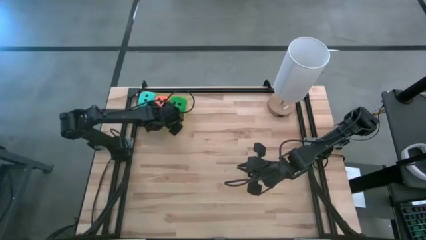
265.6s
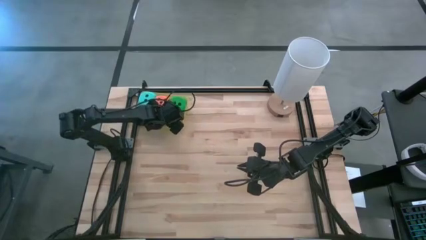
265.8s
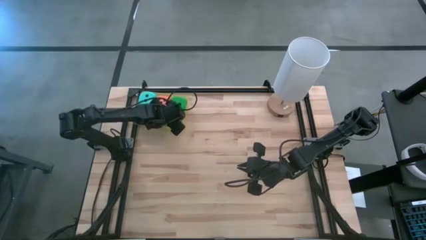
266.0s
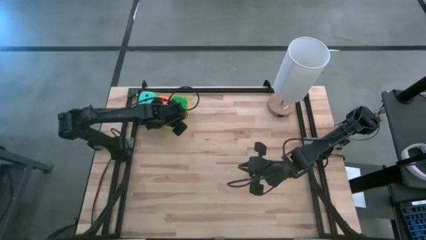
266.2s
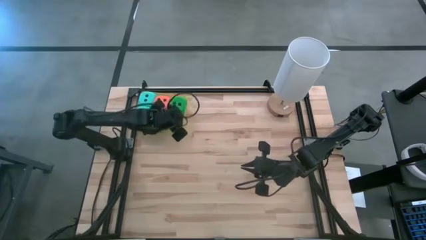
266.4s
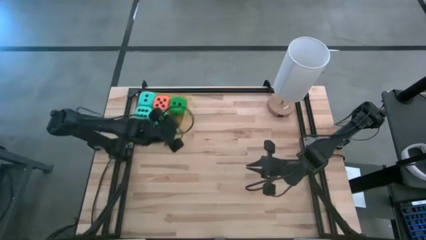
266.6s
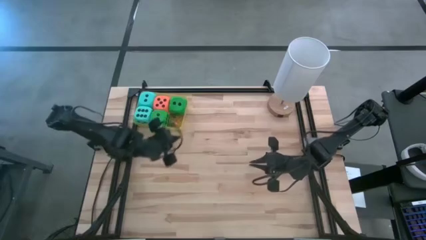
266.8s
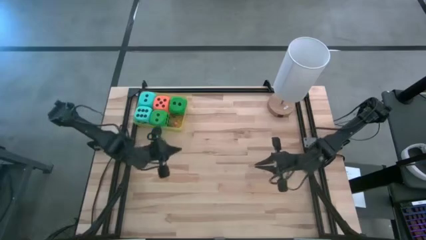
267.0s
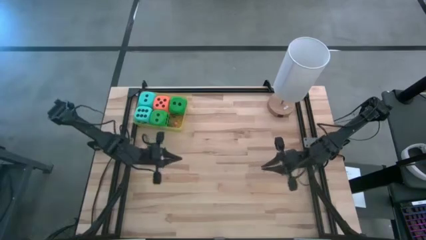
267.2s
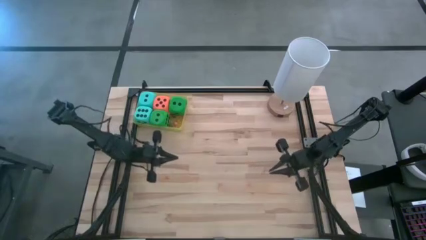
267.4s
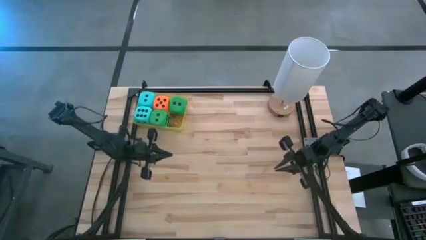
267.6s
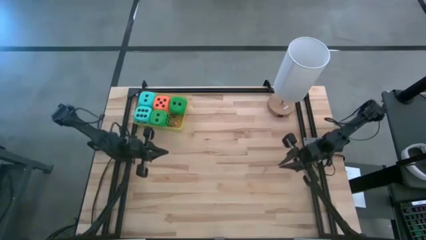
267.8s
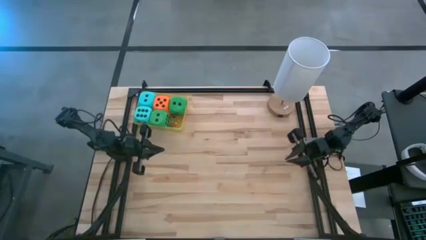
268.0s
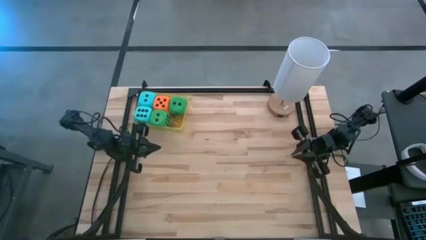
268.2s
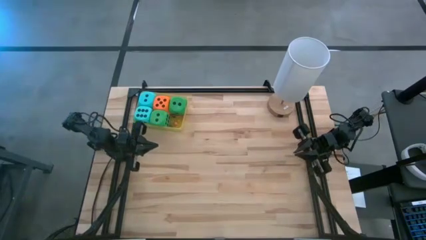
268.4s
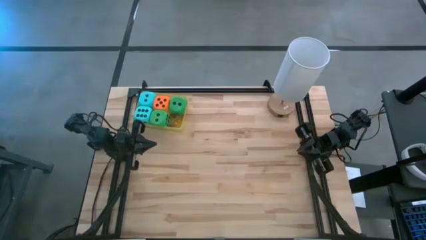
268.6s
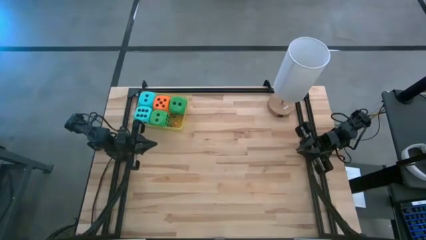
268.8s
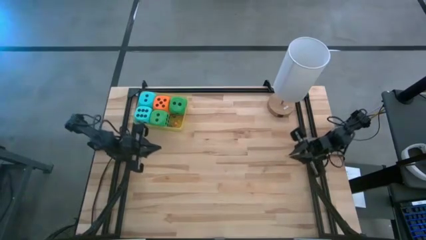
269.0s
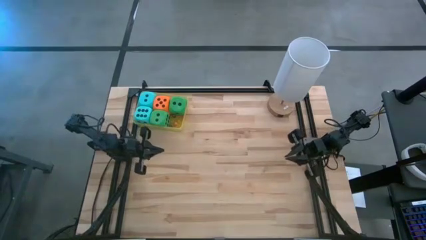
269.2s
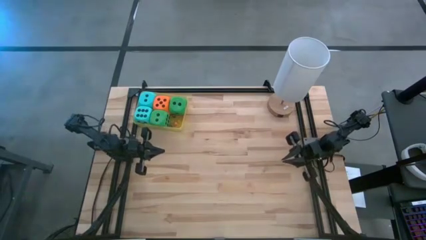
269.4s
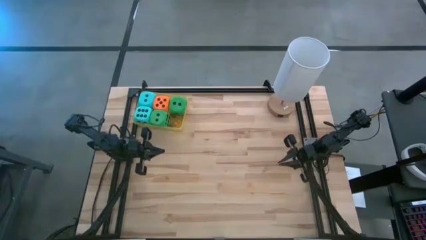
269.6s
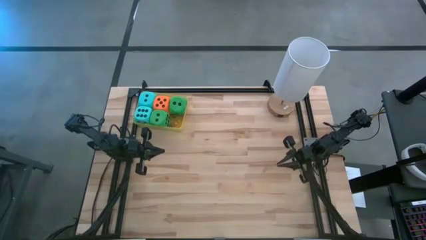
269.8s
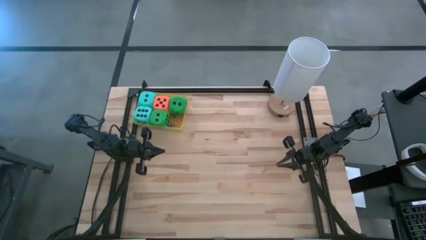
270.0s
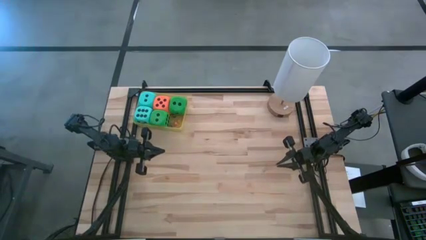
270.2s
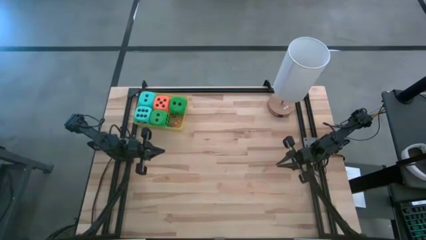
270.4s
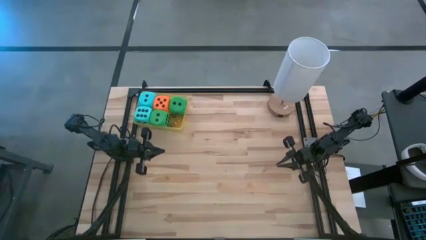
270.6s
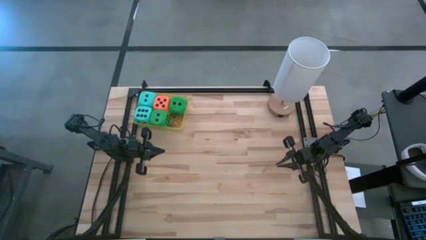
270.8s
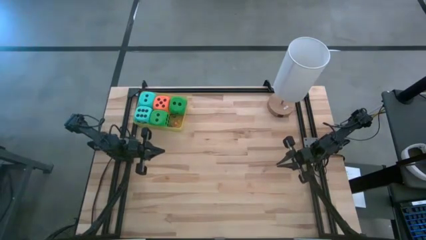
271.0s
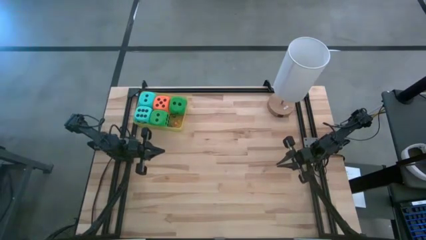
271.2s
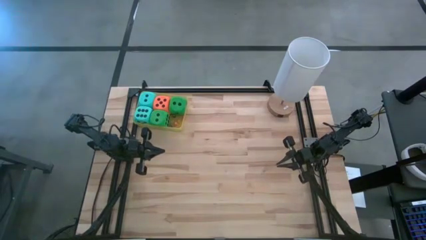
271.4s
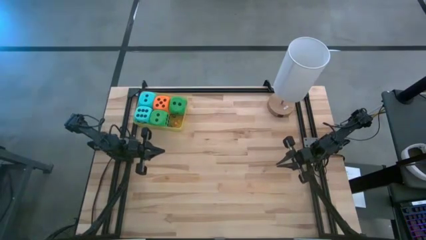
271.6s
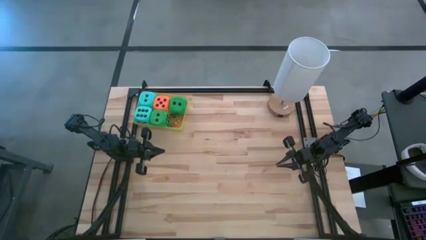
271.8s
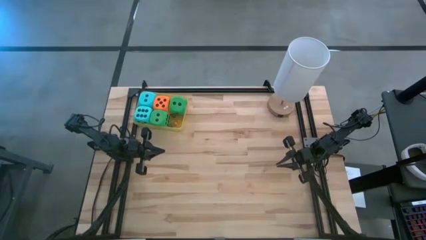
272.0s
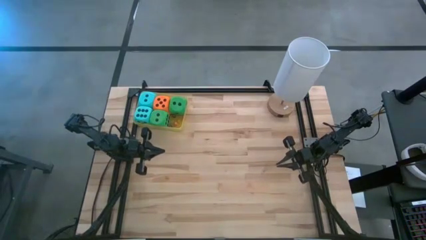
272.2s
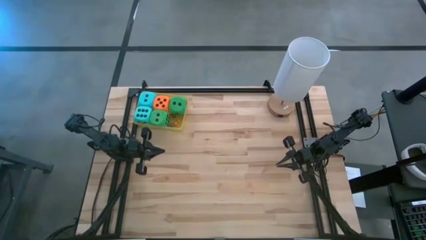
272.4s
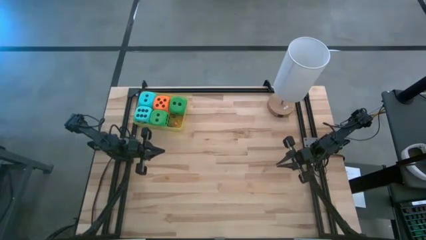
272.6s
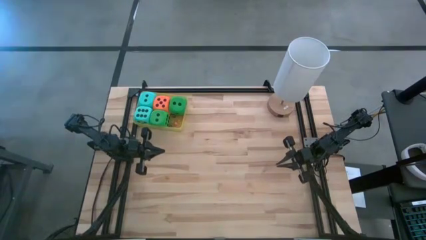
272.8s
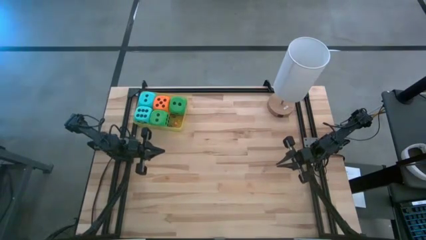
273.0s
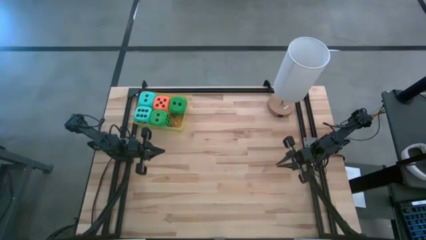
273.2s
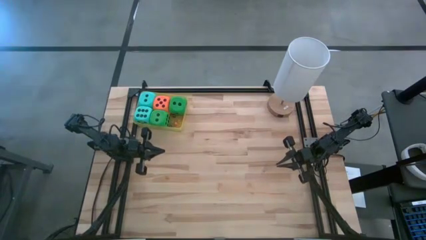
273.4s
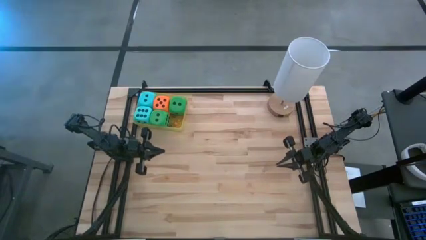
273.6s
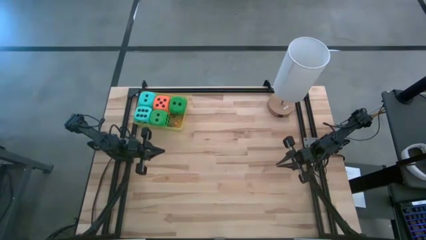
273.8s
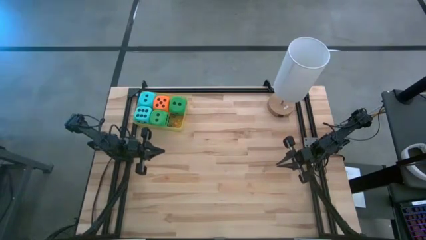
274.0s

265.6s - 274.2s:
Task: Pick & Place Dice
Return to home position

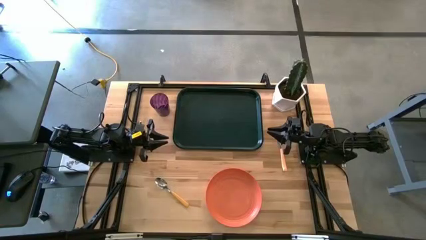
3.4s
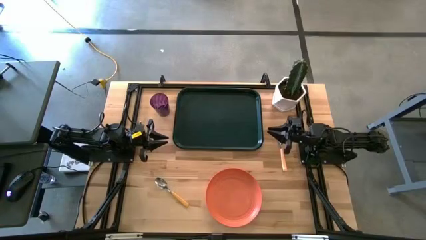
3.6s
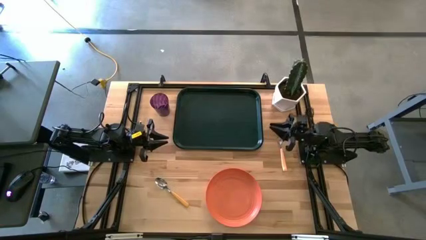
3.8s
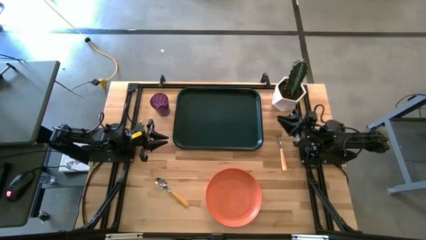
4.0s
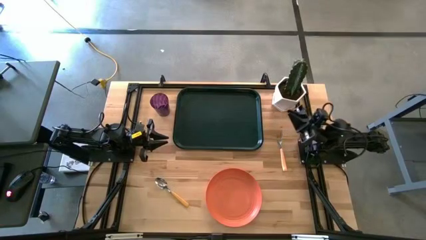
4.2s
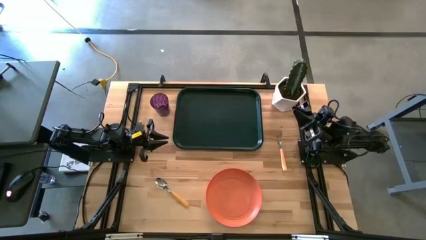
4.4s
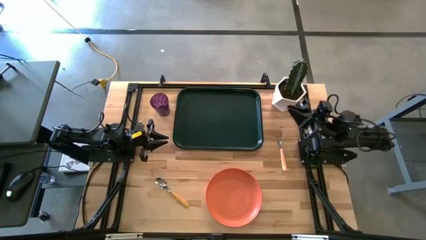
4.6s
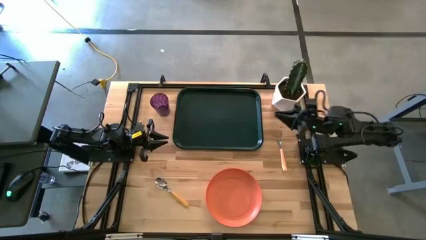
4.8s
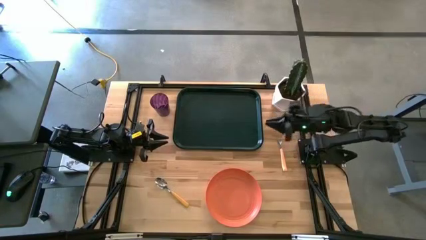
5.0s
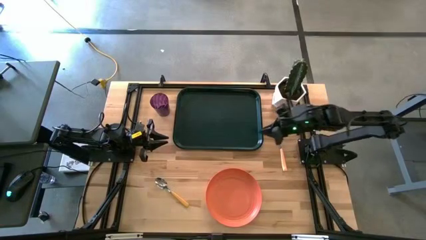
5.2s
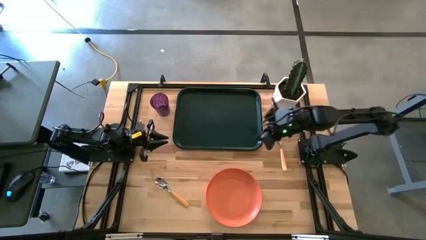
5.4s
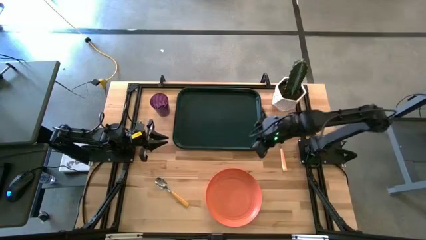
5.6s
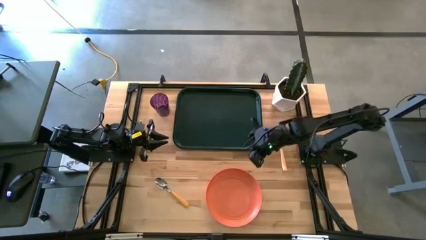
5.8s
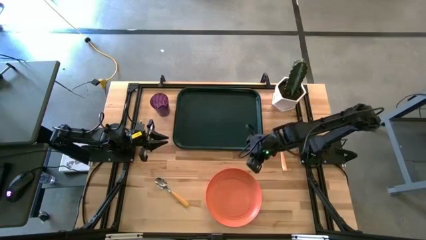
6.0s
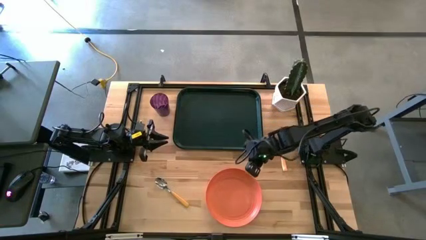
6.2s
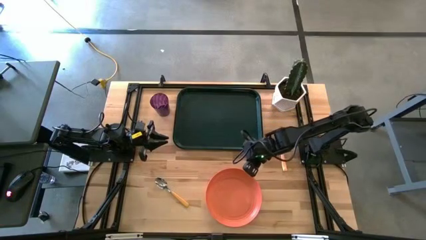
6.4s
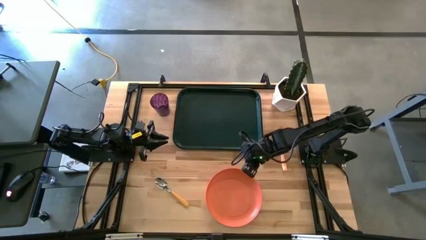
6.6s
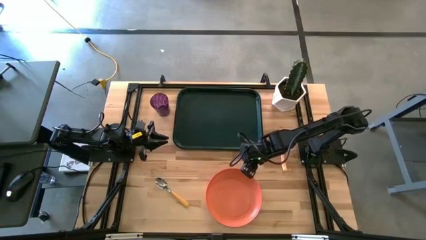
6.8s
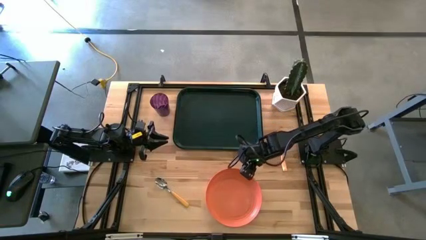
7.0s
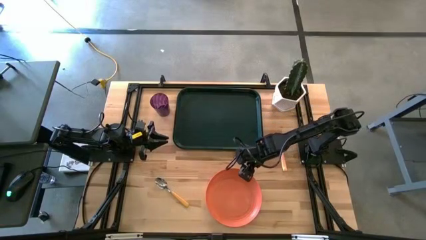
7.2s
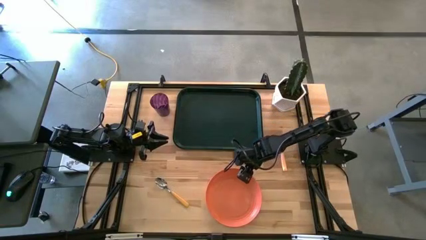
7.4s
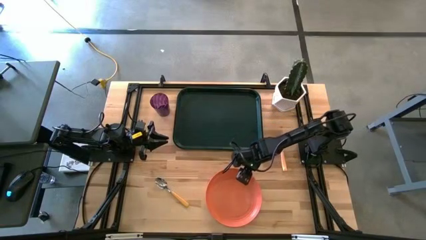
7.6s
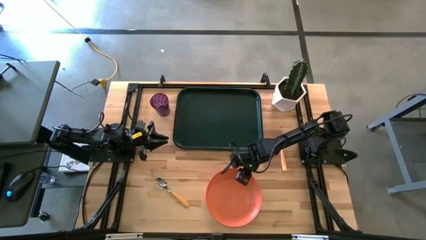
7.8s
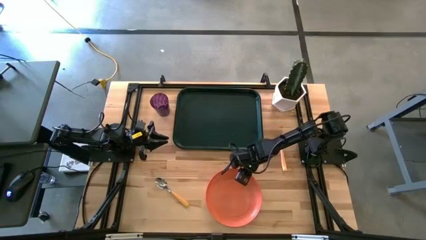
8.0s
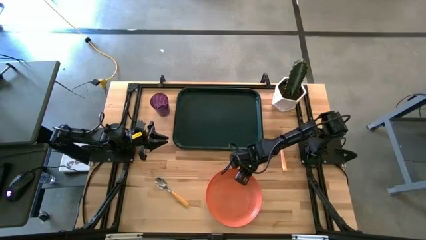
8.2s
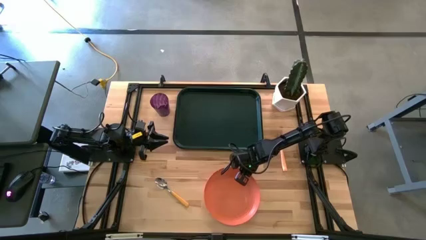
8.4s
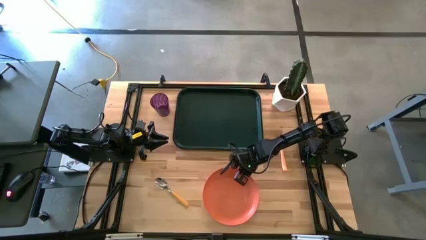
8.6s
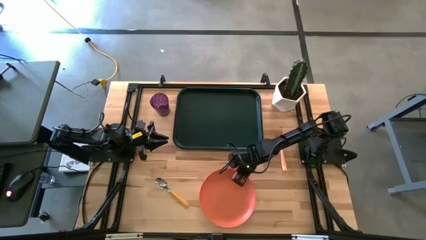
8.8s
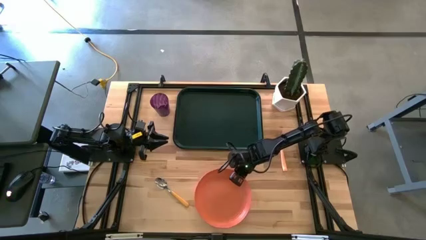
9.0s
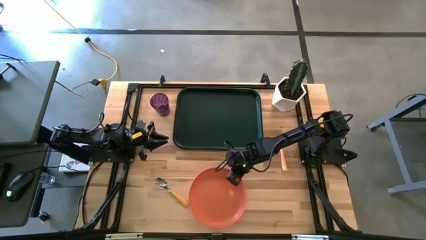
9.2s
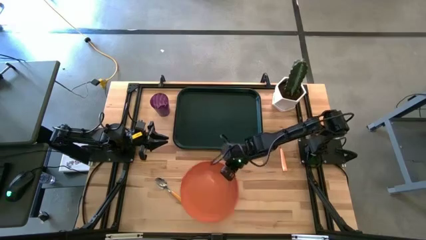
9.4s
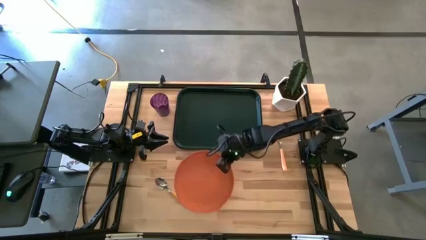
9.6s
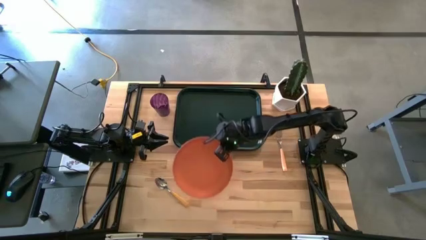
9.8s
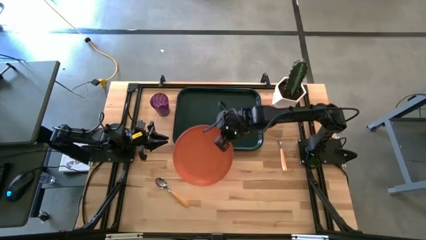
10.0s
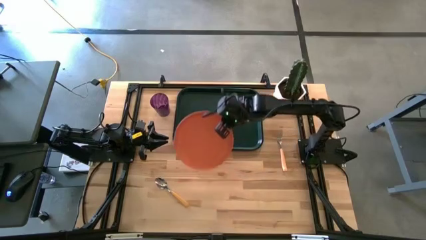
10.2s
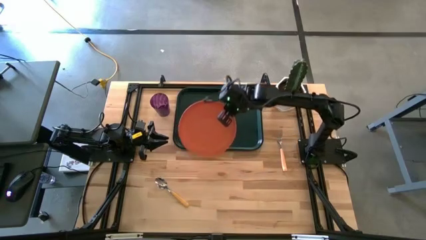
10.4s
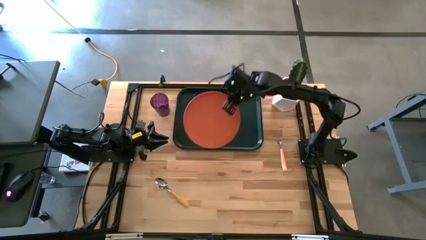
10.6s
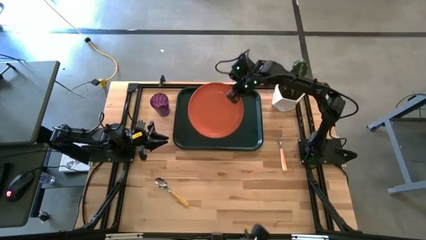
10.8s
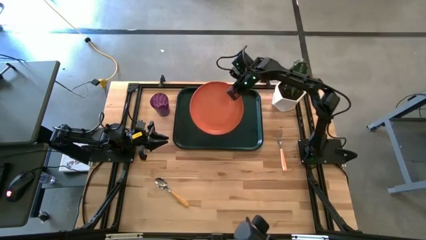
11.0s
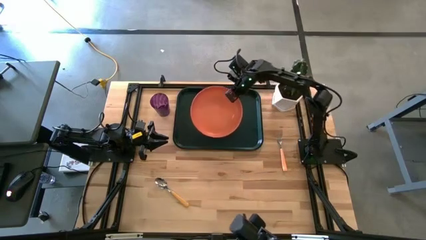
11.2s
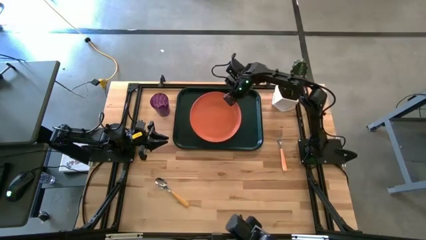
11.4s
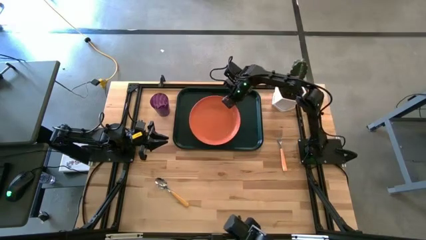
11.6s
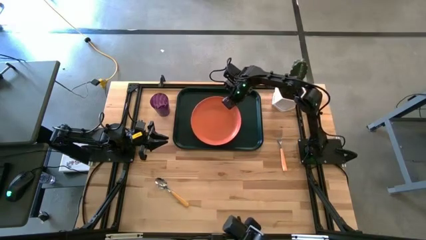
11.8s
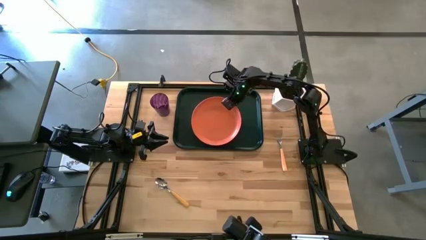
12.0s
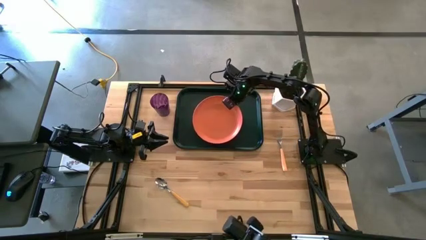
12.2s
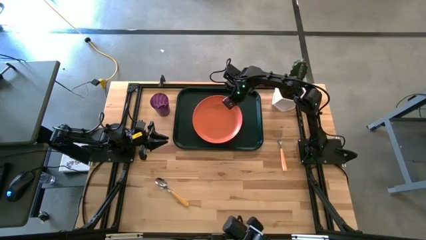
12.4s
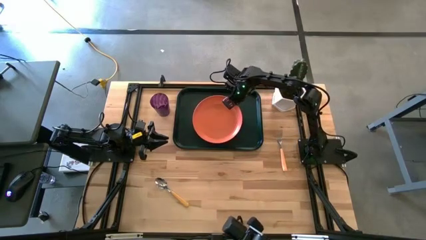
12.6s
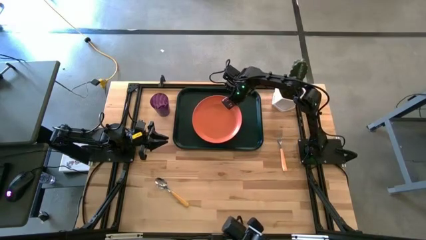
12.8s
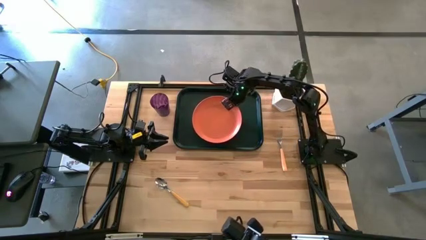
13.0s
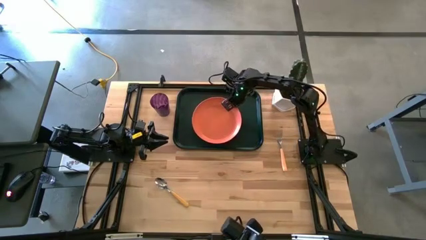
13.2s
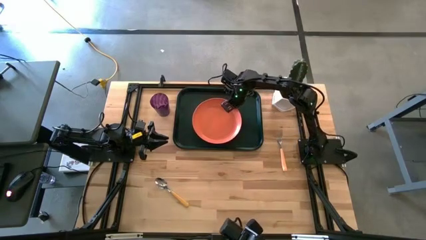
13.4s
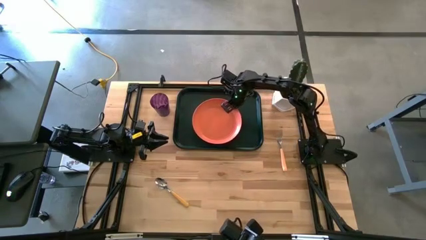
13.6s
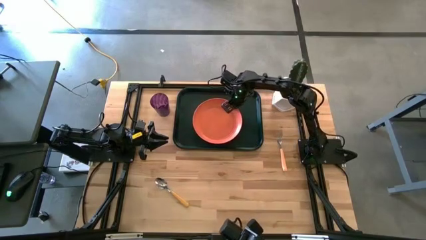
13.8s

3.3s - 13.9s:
Task: Pick and place plate/cup/fork/spoon on tray
Put the orange plate on the black serving tray
